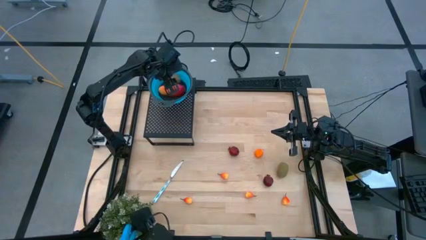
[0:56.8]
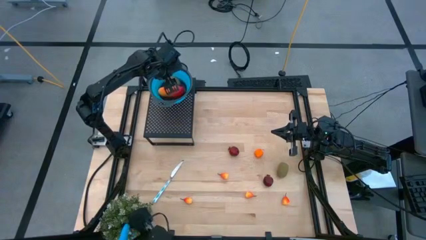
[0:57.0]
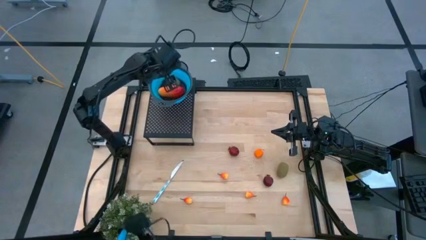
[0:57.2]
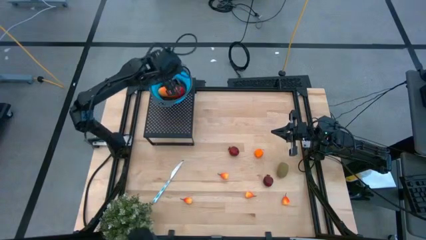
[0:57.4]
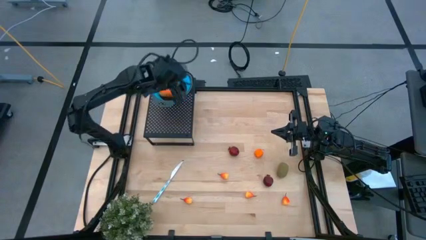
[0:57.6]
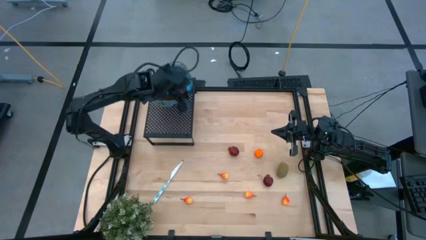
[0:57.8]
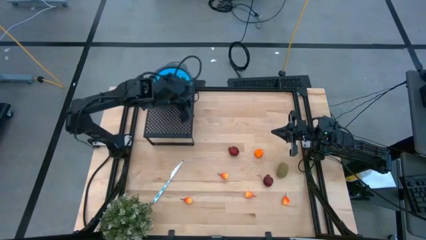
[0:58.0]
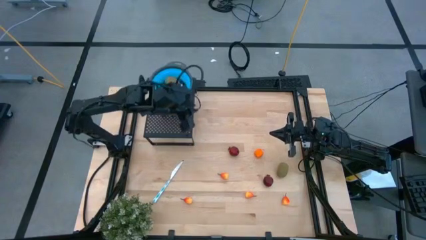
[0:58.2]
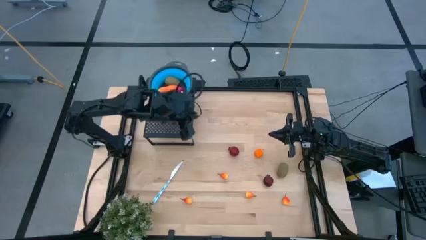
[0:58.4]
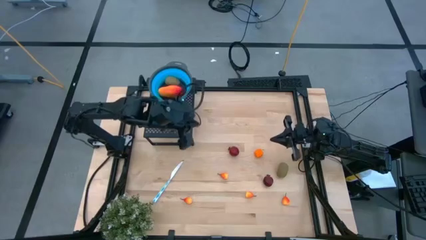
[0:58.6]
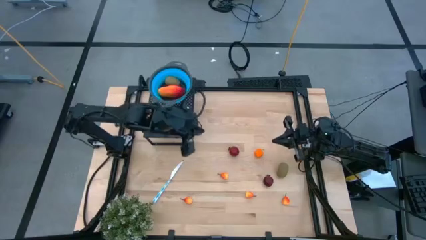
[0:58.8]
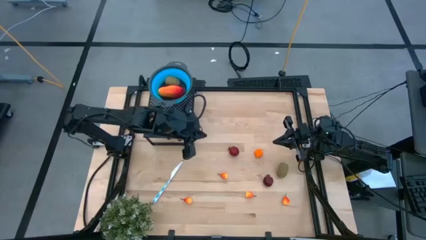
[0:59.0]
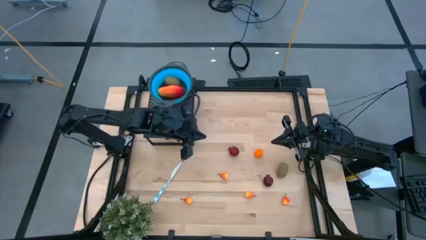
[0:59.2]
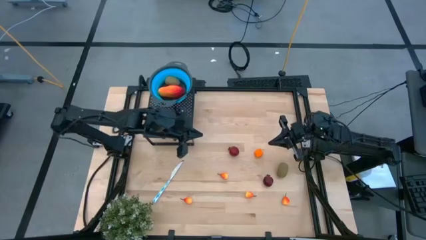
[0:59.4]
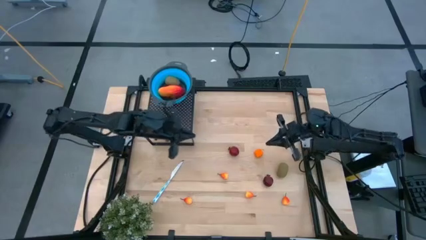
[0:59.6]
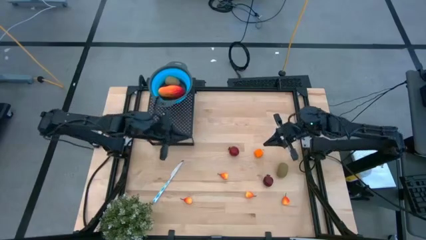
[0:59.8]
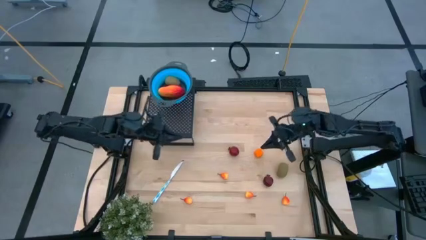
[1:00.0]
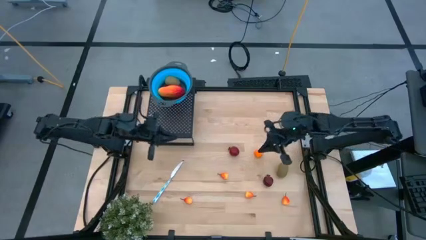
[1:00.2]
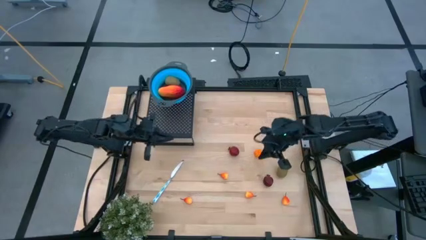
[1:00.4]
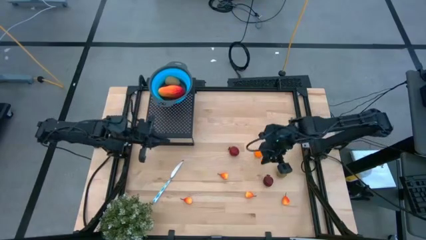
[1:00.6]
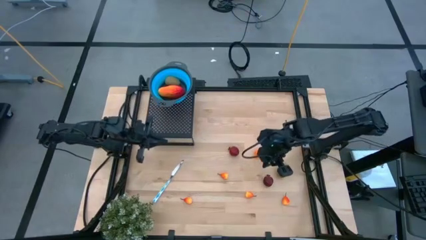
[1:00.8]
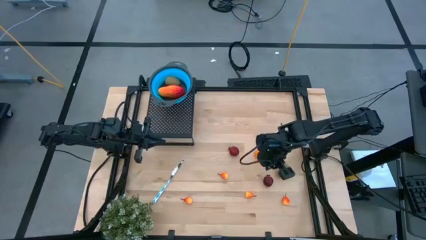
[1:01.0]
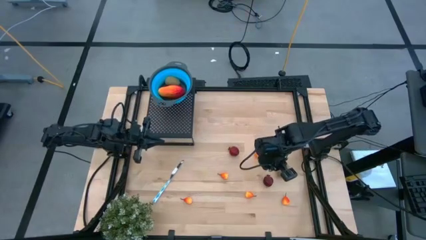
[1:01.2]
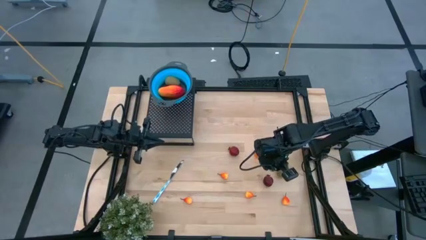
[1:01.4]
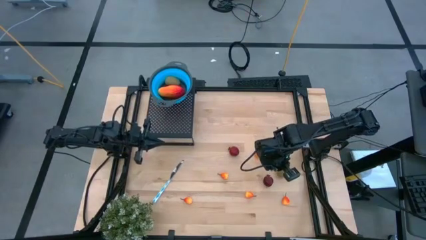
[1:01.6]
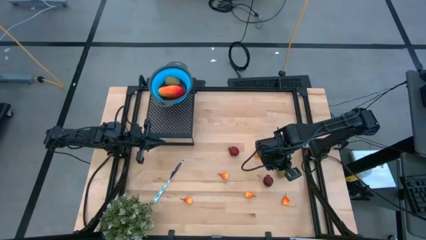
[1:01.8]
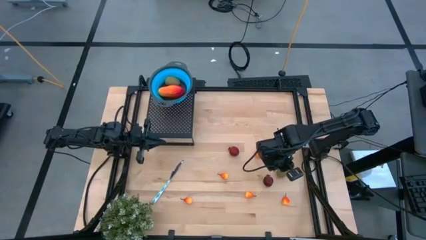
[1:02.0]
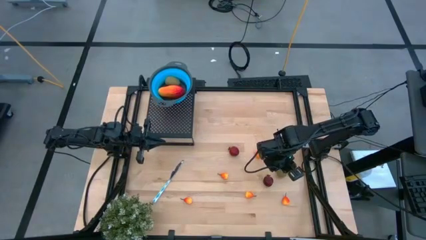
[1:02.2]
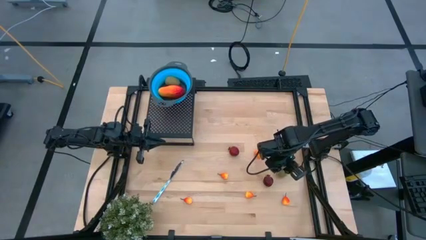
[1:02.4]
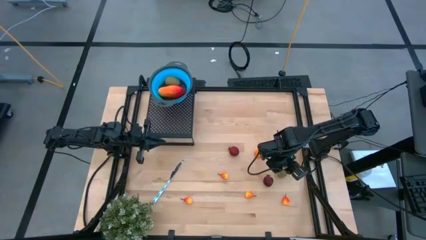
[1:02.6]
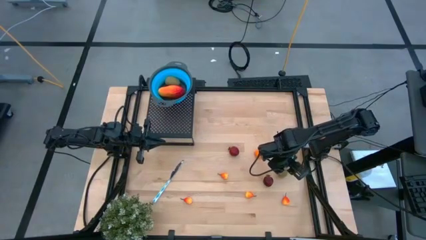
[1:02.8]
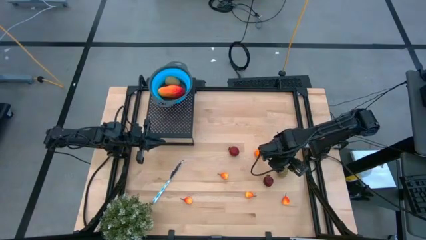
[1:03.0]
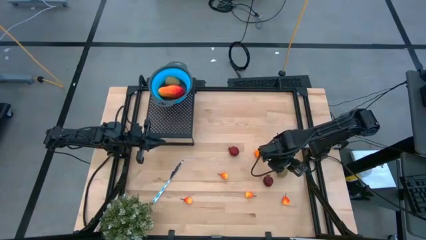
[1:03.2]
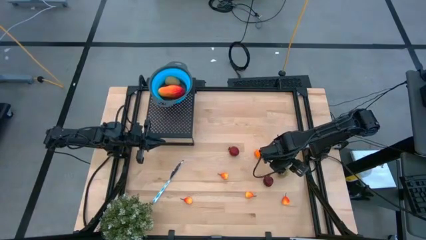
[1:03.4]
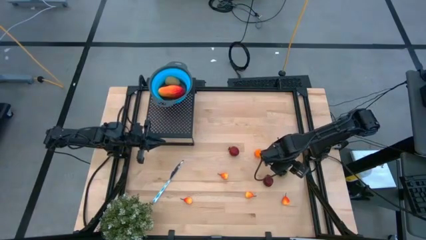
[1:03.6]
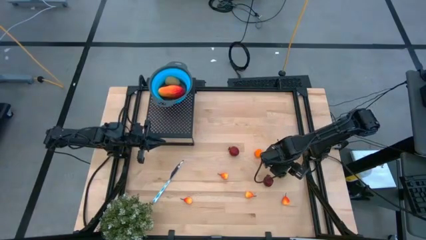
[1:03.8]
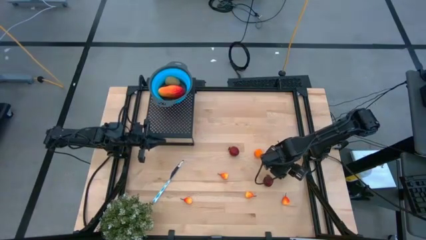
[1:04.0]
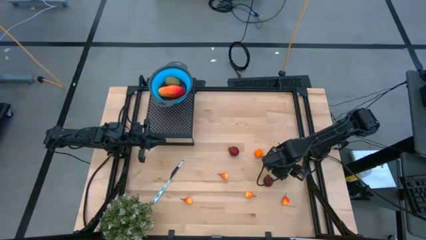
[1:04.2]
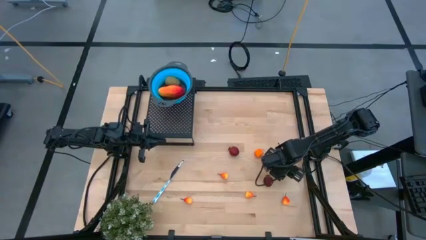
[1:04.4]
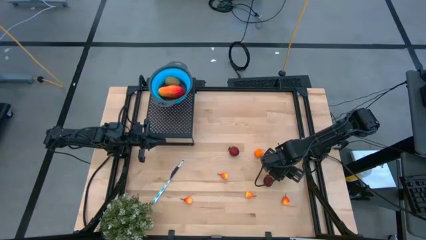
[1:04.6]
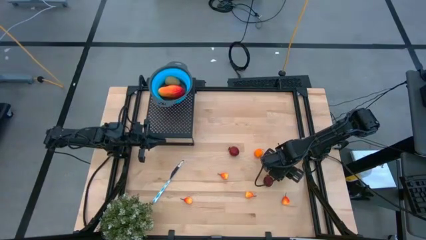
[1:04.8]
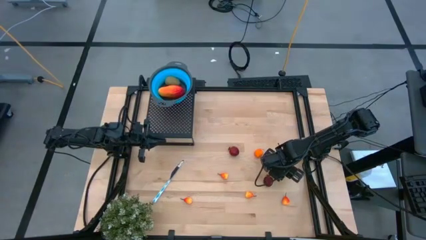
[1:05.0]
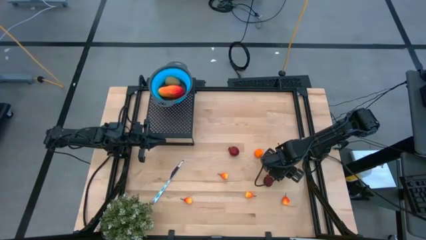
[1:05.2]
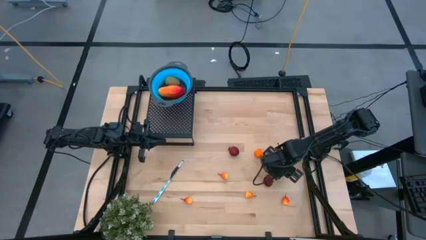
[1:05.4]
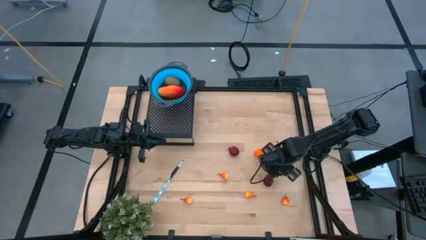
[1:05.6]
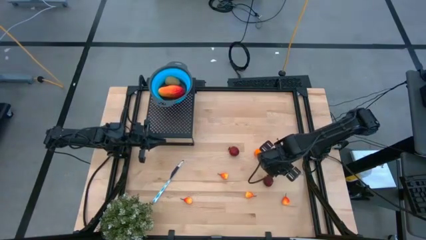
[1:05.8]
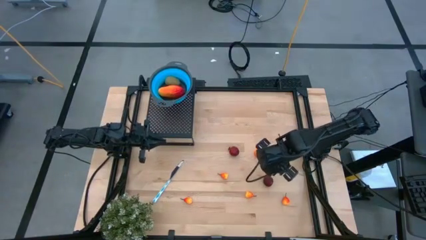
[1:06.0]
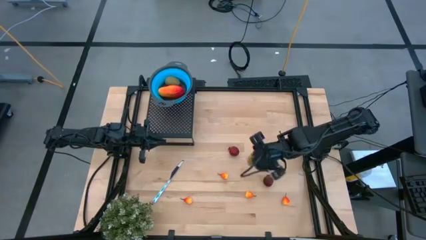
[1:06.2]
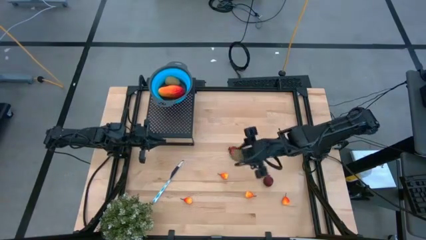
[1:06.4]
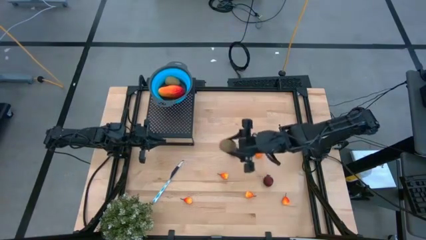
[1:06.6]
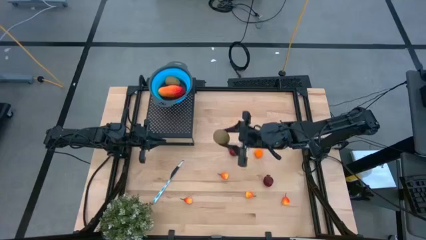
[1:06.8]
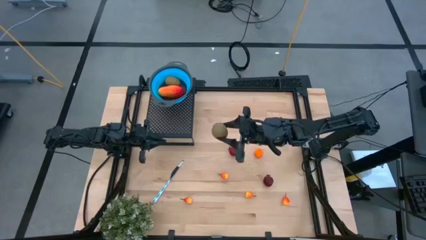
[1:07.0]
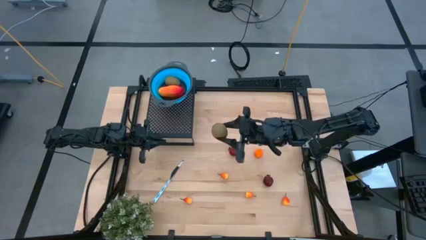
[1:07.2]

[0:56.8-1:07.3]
Task: Pick & Place Fruit
Put the brown kiwi into the blue strainer bowl on the shelf

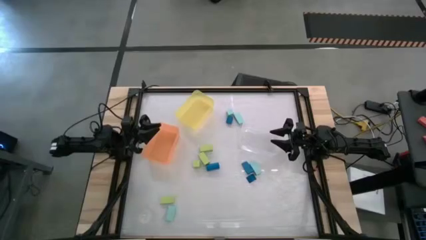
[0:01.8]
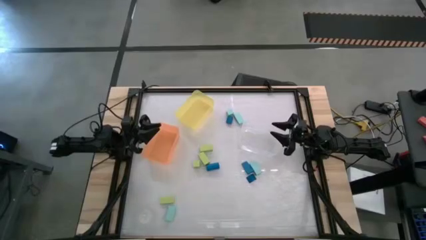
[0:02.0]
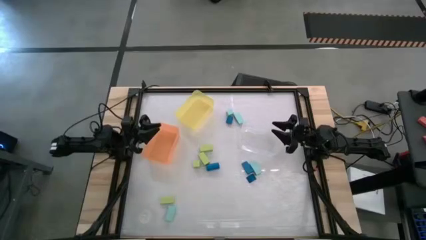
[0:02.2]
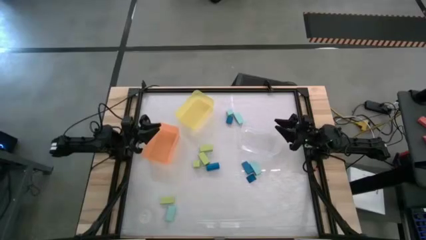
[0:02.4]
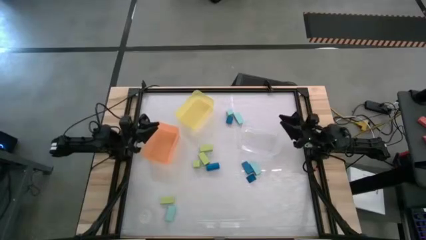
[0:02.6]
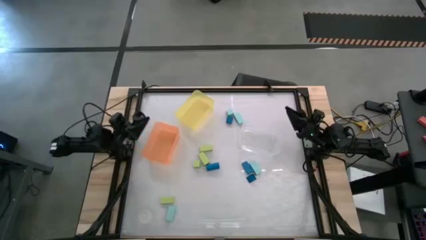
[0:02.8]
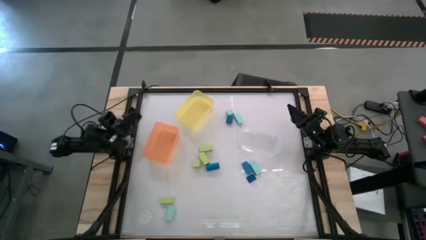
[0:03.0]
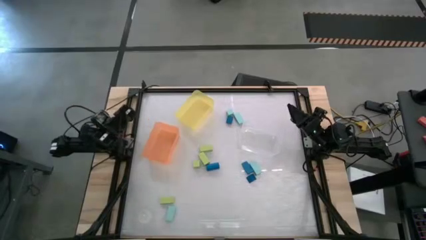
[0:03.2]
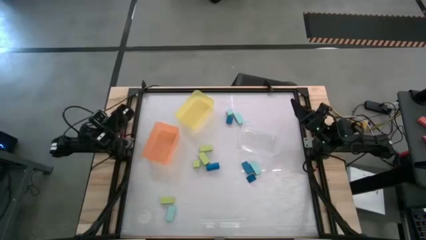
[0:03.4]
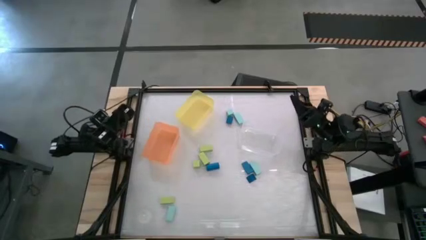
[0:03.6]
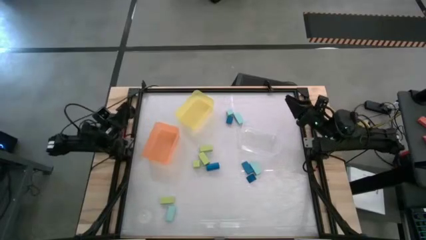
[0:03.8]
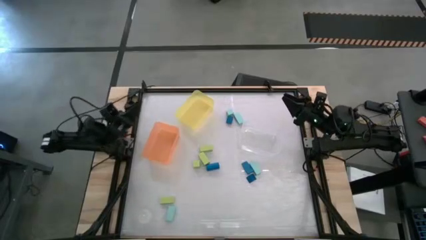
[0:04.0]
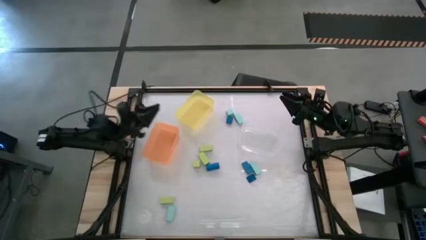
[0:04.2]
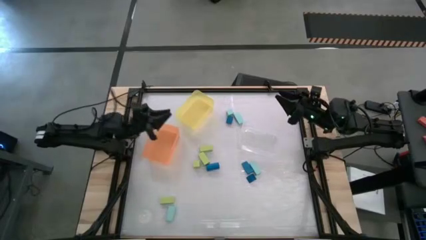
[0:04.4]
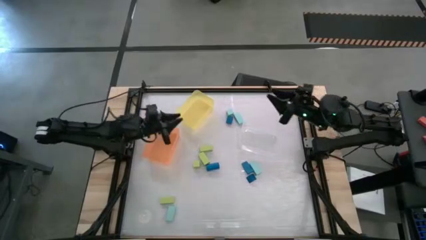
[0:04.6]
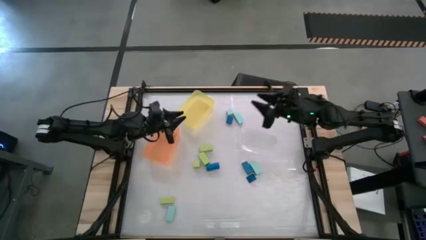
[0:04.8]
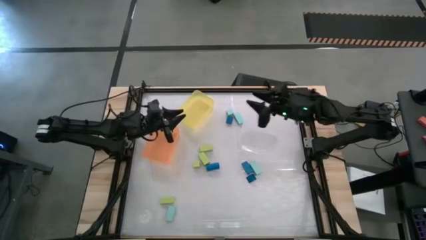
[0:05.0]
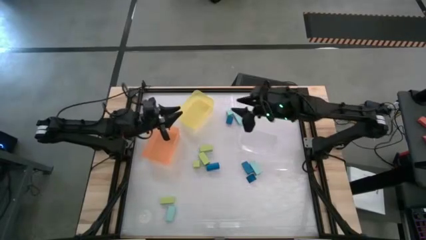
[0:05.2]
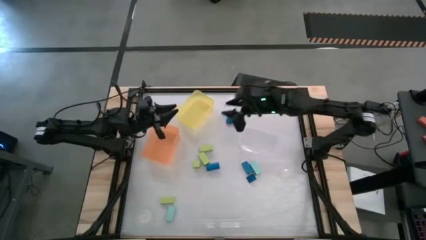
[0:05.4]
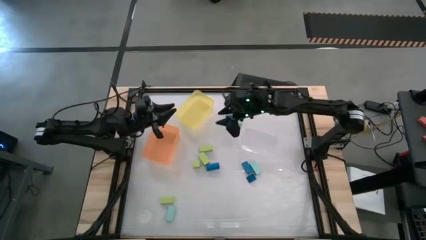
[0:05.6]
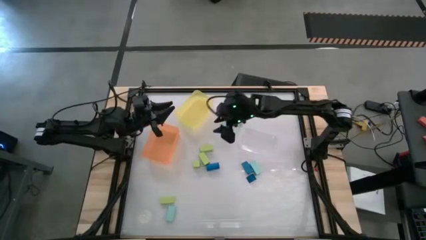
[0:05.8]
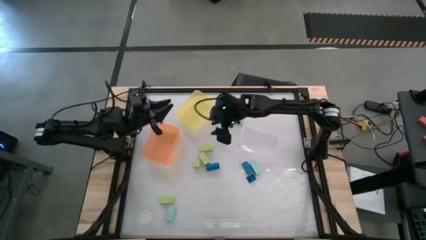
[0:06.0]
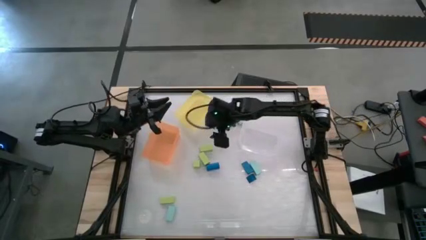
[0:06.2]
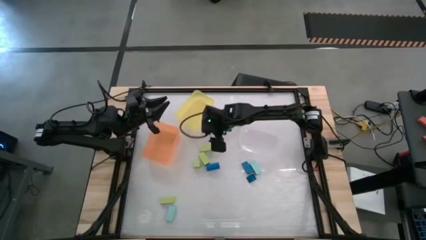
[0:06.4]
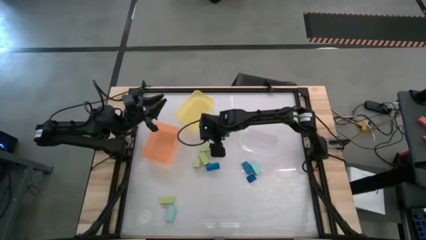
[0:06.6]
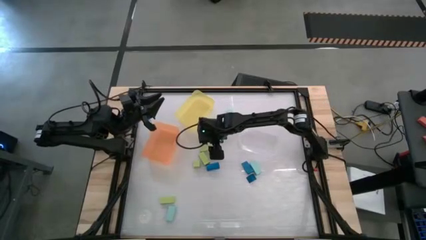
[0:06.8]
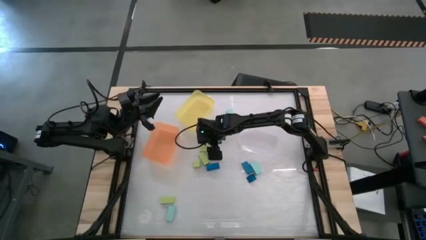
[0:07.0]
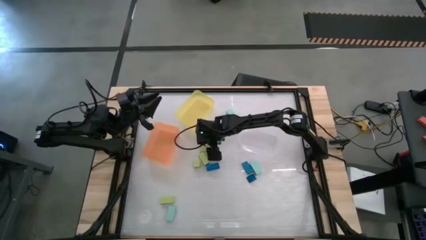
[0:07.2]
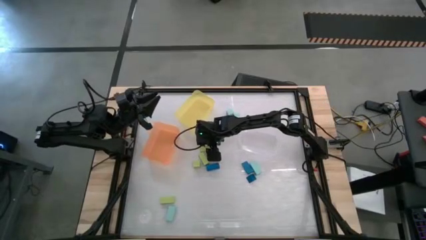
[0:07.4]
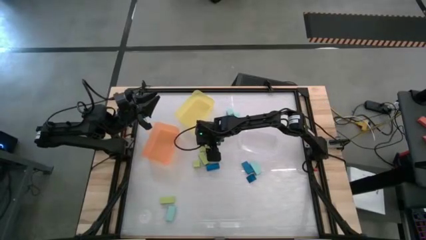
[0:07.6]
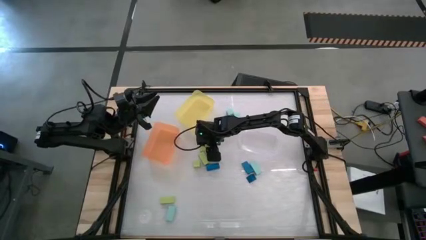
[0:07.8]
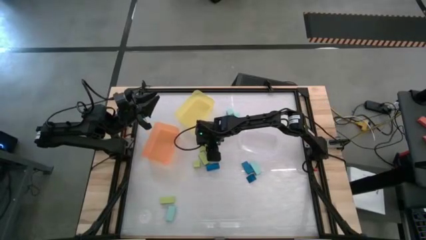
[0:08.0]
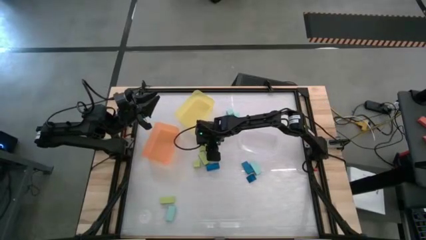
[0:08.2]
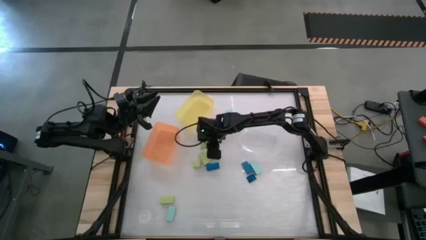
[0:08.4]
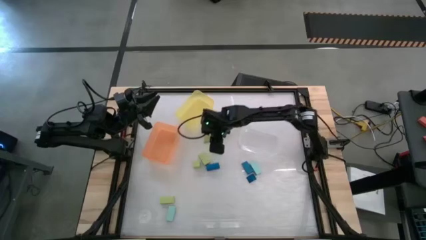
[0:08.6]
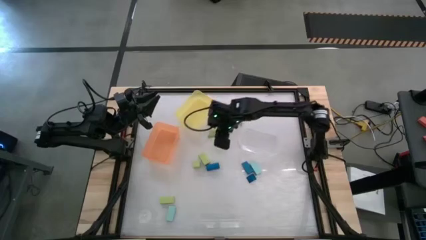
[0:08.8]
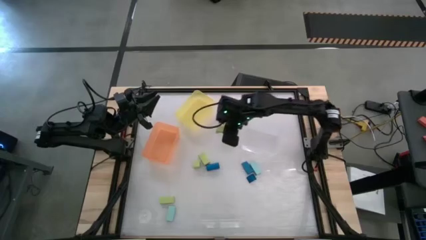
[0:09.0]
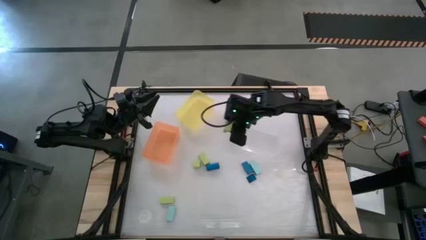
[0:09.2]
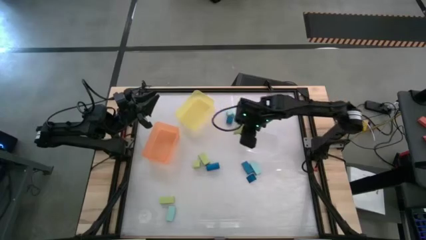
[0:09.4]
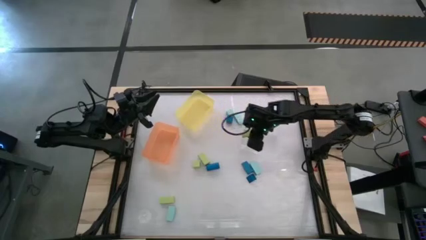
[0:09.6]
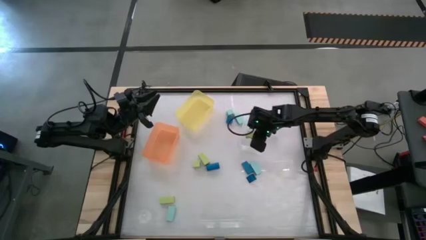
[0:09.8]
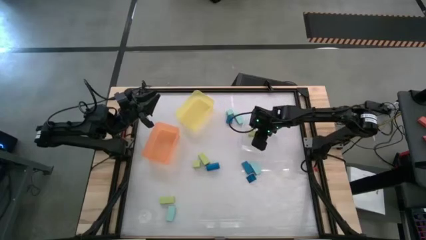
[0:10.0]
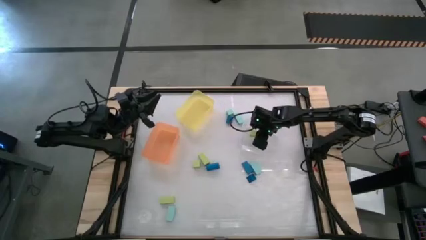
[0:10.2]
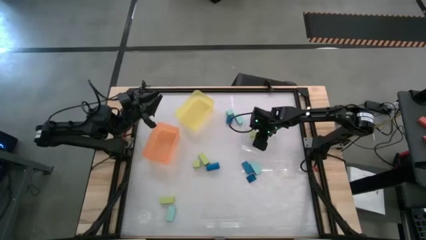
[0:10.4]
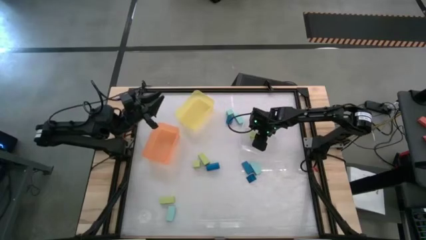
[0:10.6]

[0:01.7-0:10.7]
Task: Sort & place blocks by color
Put the green block into the transparent bin
